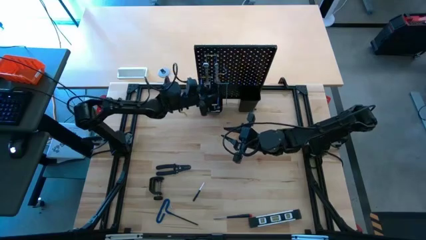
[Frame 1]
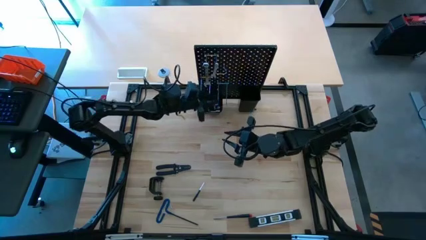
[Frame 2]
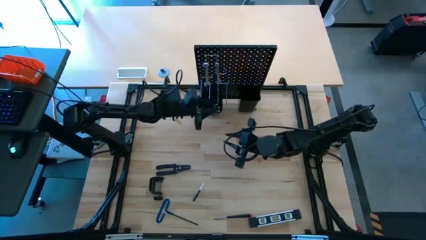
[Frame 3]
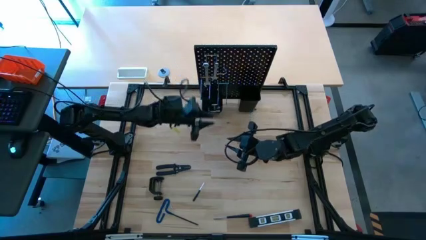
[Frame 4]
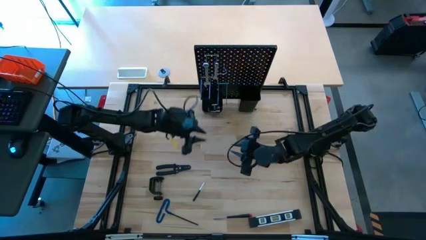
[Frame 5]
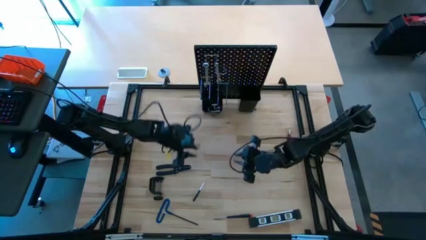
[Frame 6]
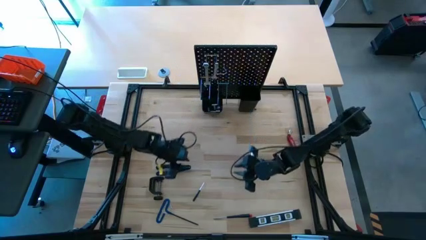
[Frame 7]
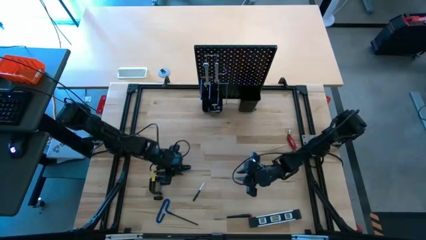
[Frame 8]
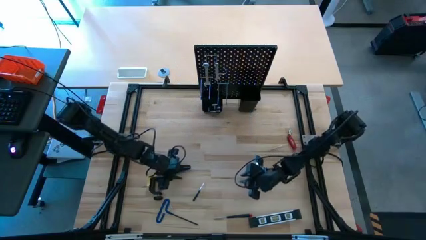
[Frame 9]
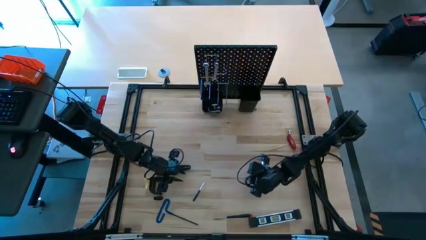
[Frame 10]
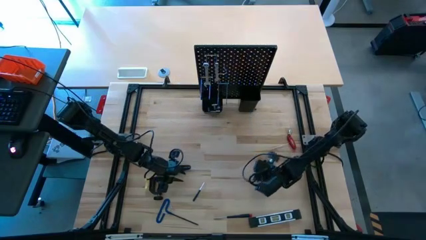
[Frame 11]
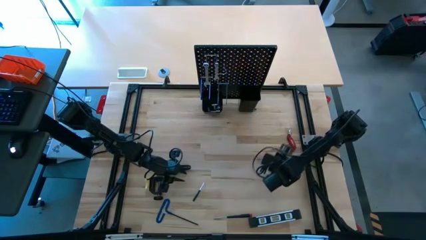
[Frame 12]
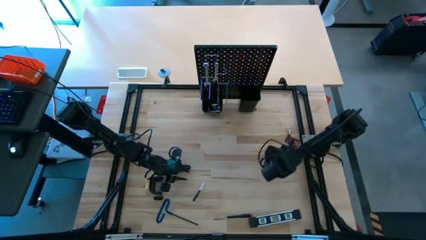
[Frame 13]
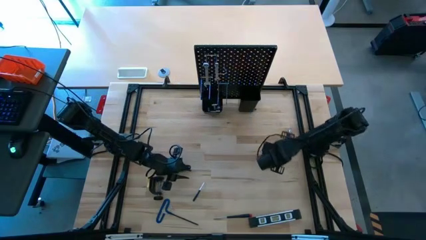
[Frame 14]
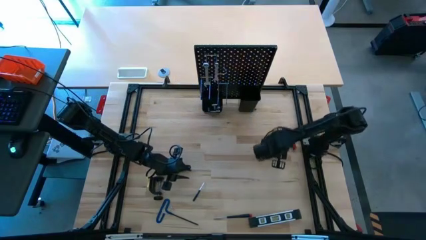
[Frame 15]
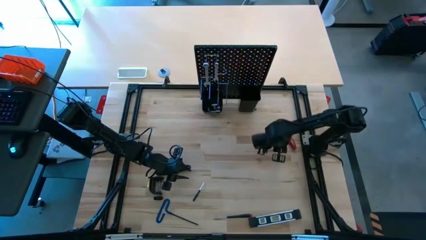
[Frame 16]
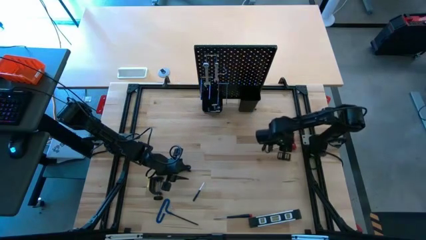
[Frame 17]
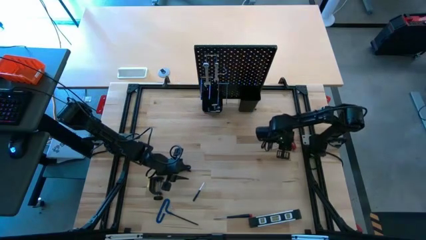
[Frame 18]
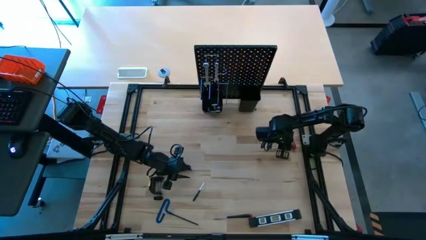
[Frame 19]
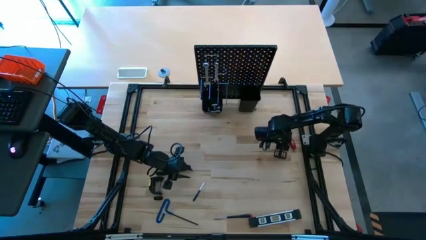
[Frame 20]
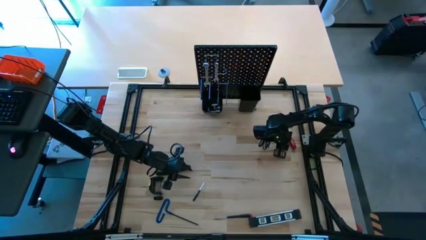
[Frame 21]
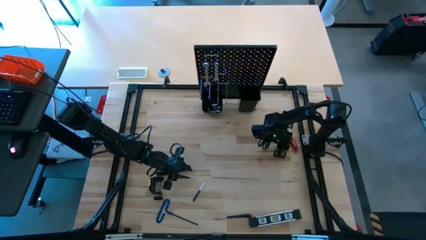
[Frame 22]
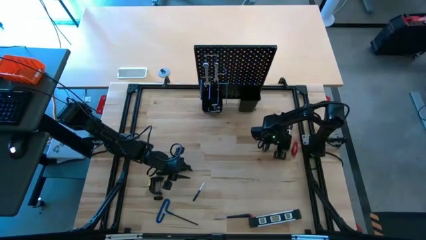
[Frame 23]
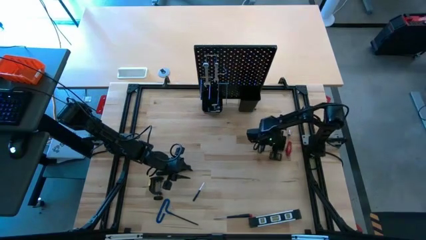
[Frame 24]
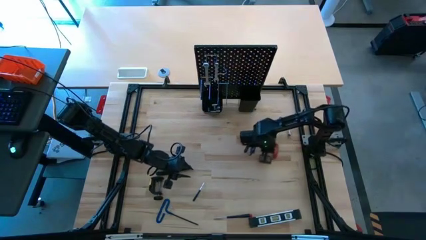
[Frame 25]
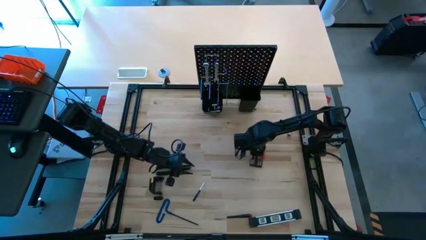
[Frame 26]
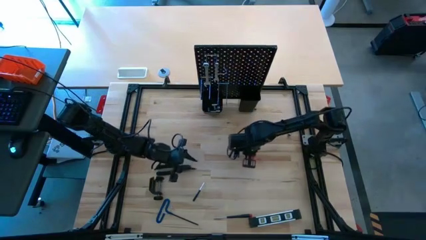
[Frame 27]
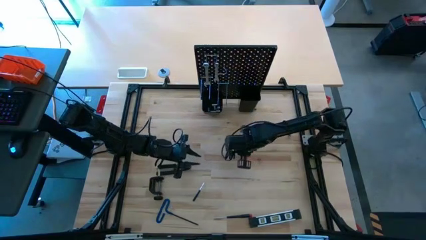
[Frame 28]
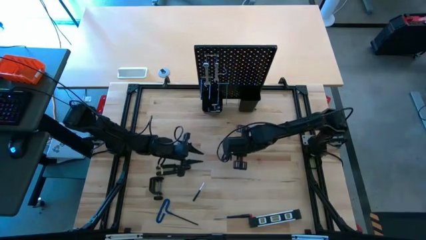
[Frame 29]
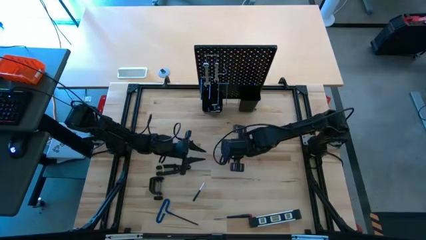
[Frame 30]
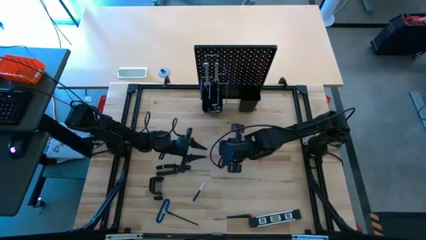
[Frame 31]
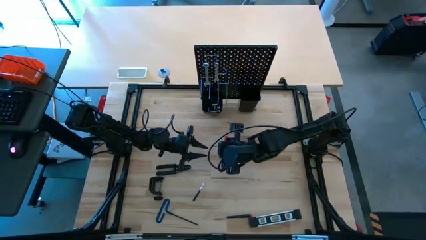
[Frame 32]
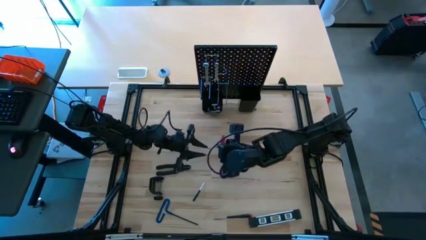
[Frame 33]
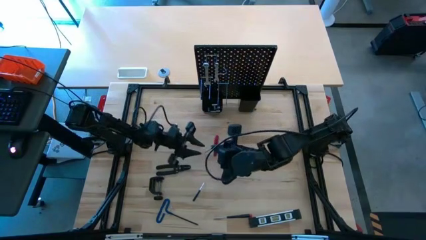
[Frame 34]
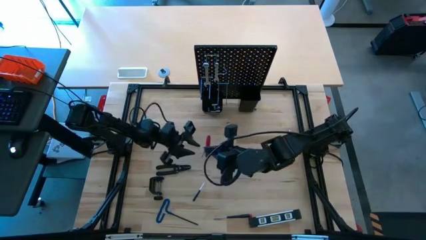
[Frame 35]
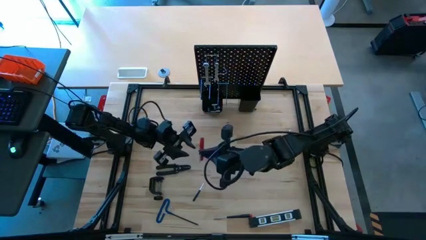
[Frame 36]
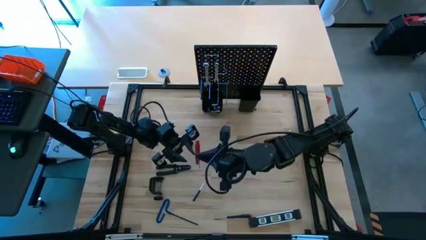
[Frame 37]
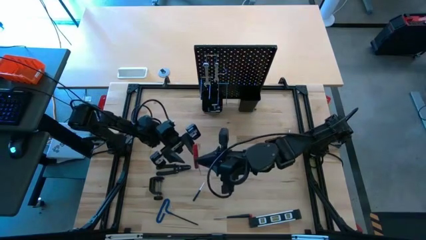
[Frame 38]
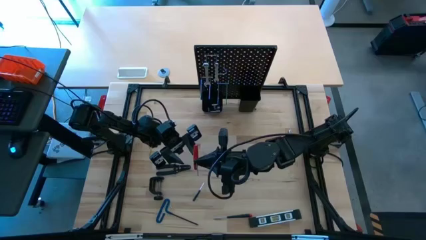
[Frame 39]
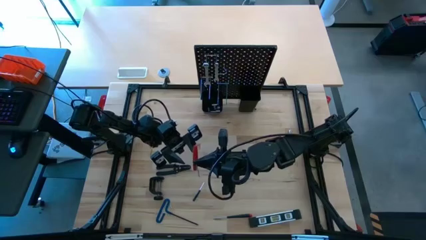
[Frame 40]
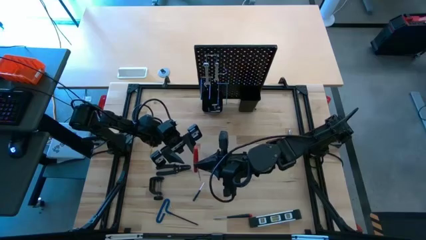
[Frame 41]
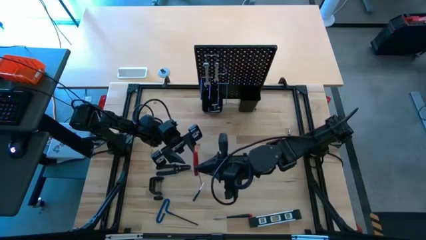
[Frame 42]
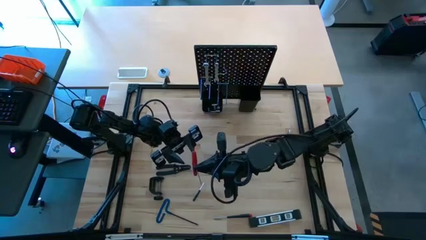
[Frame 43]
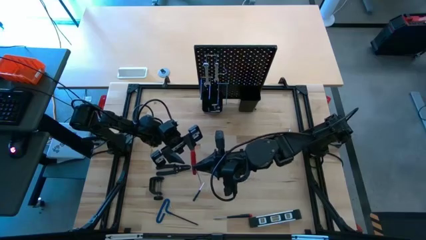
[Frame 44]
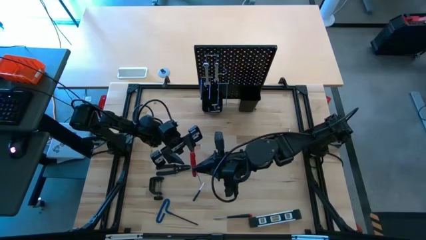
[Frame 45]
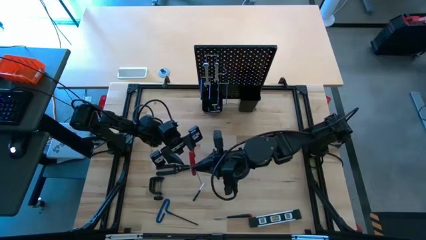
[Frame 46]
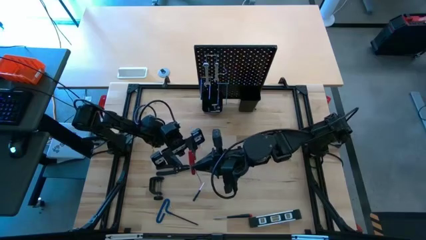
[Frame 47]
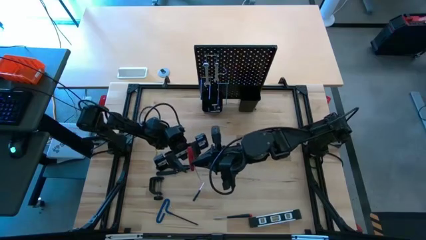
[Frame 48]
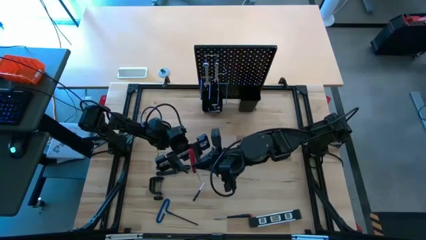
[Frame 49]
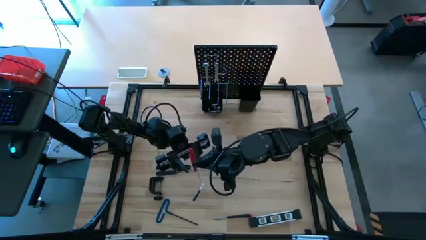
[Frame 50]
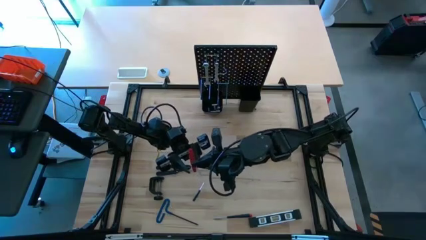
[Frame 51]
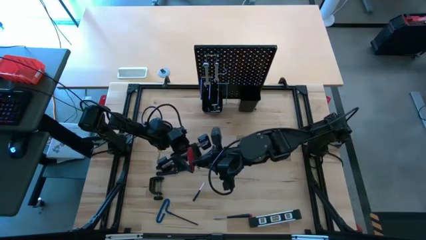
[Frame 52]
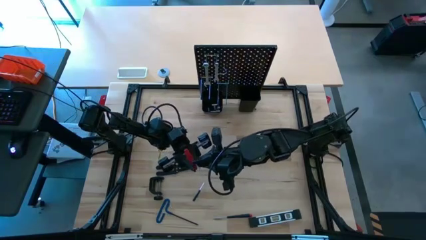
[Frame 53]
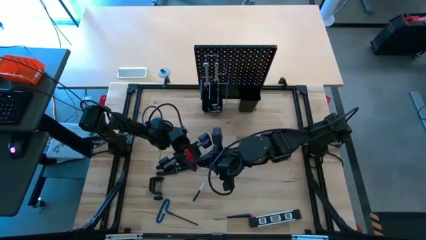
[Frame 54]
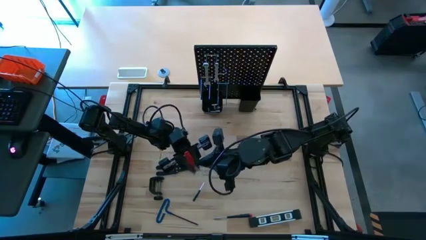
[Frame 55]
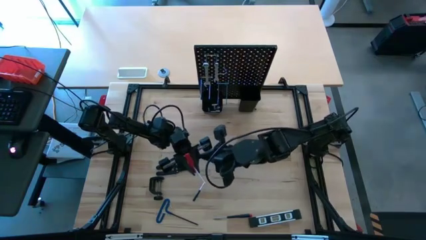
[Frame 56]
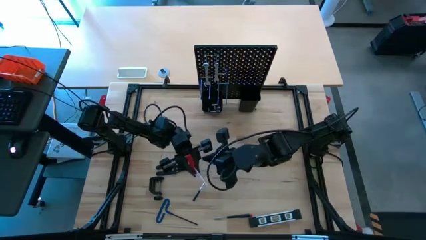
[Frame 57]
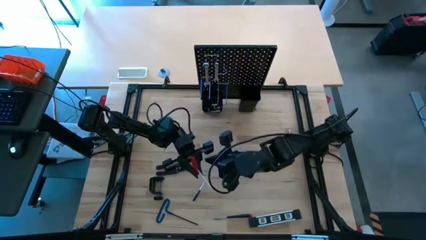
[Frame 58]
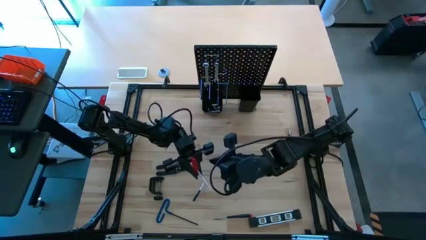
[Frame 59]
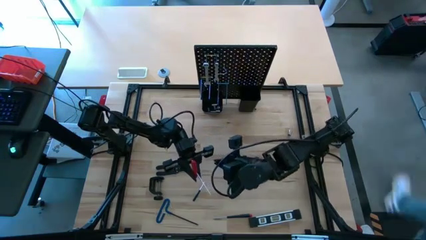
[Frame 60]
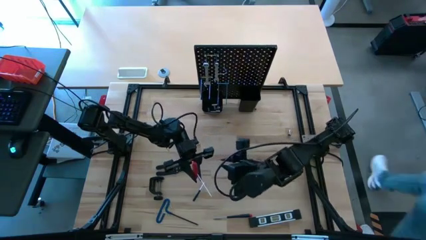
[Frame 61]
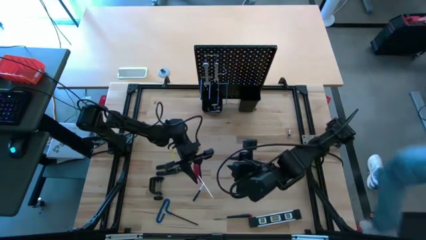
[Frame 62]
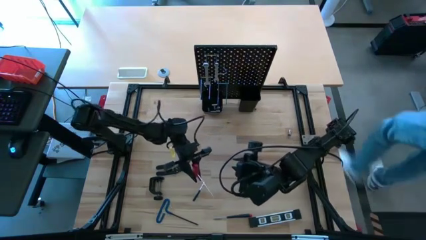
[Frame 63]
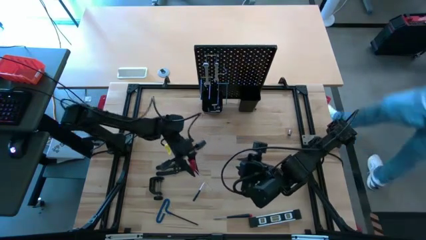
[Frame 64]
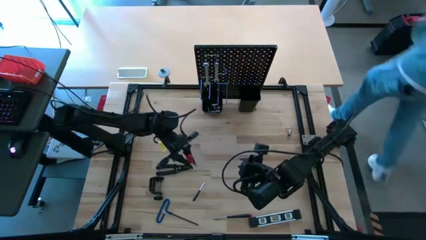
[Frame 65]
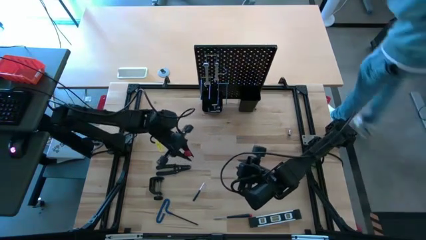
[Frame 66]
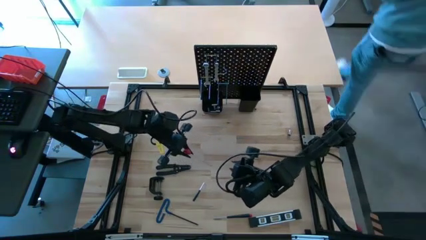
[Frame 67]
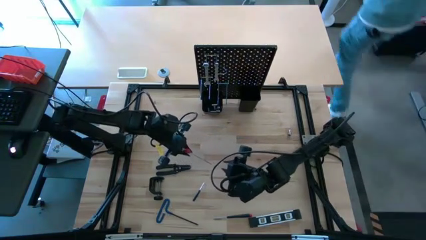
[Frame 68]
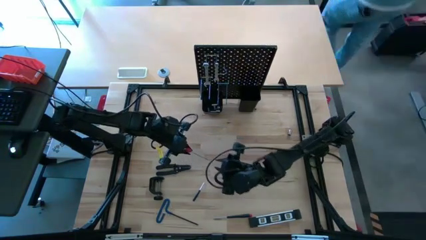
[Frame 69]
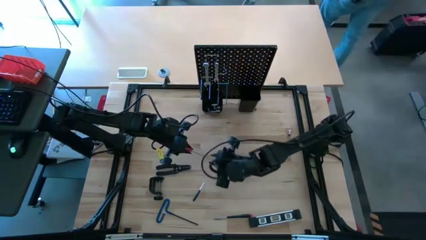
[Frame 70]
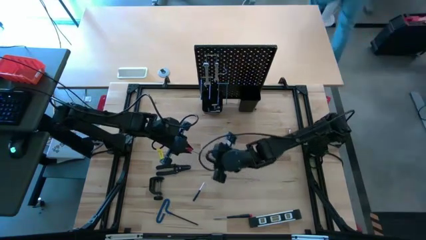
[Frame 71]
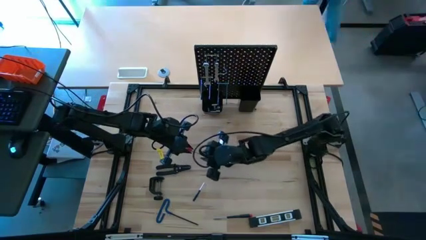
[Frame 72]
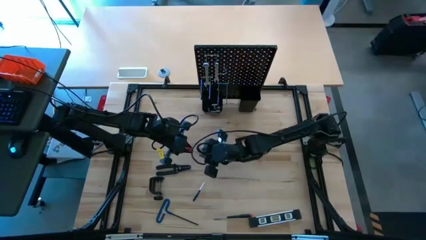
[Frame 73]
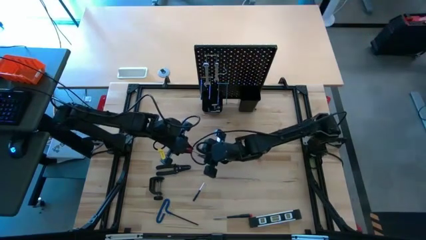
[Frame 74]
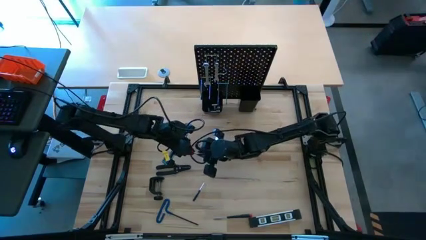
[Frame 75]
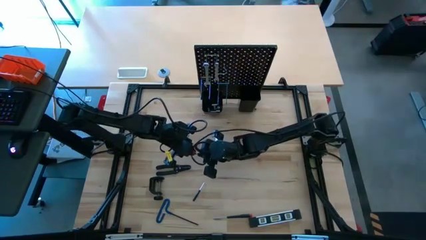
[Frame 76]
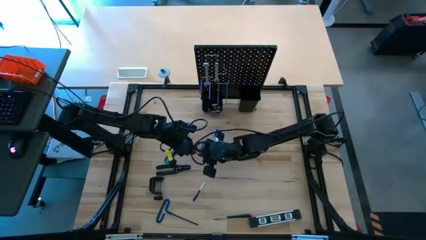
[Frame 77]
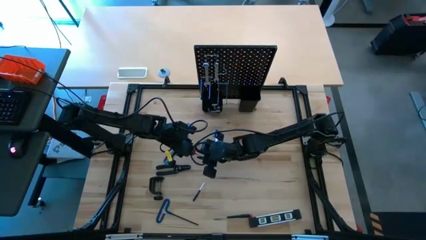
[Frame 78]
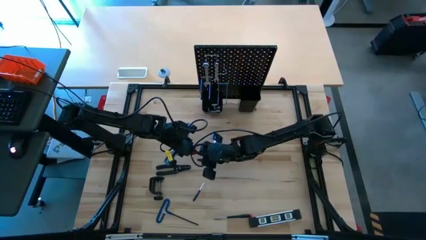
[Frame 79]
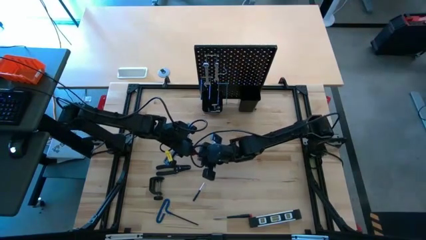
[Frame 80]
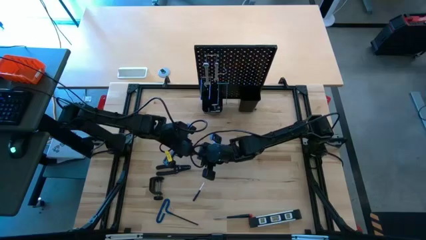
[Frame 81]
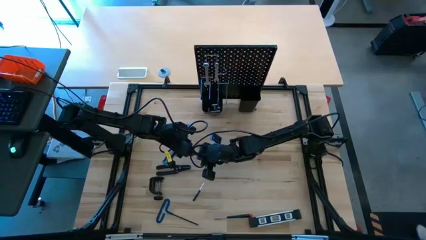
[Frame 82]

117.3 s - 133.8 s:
Task: Hang tools onto peg board
Put the Allen wrench into the right bin on the pegboard
